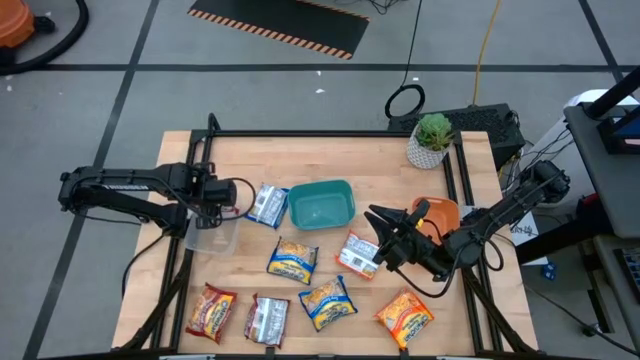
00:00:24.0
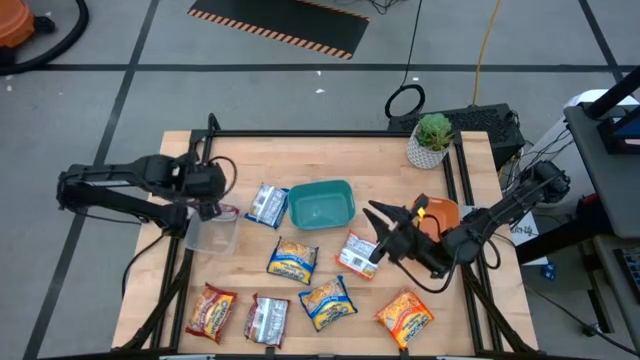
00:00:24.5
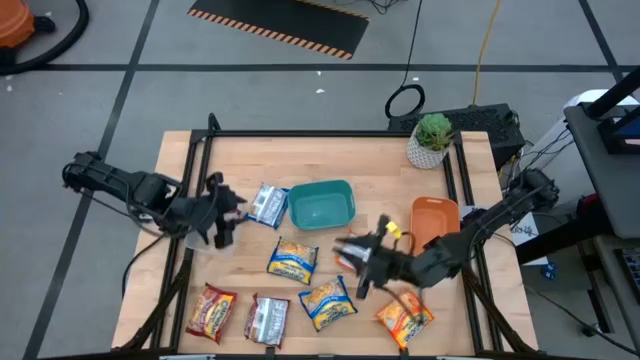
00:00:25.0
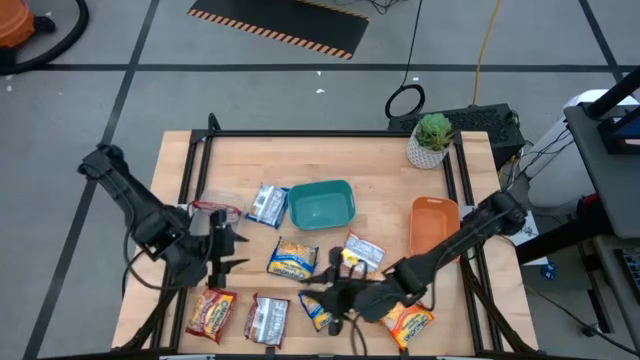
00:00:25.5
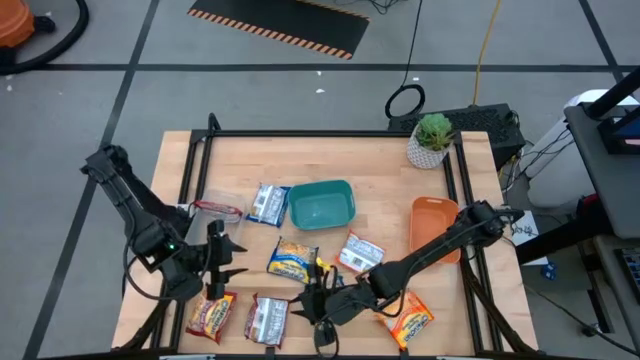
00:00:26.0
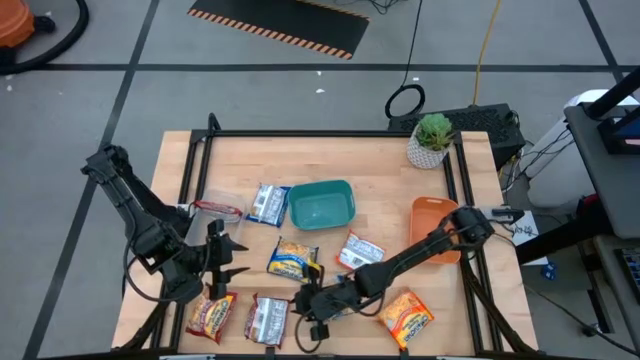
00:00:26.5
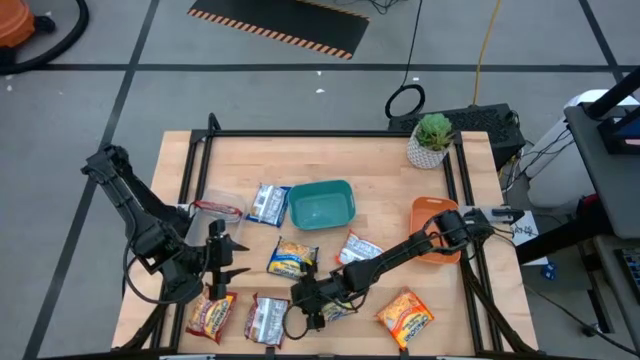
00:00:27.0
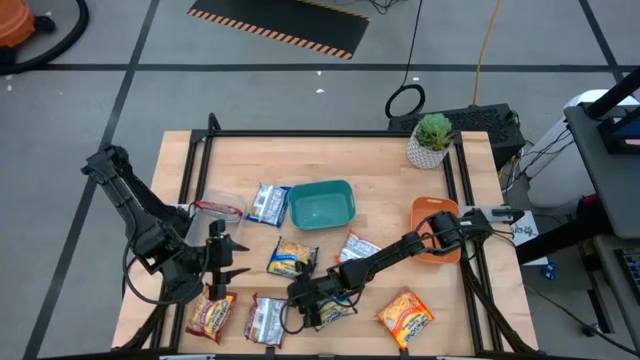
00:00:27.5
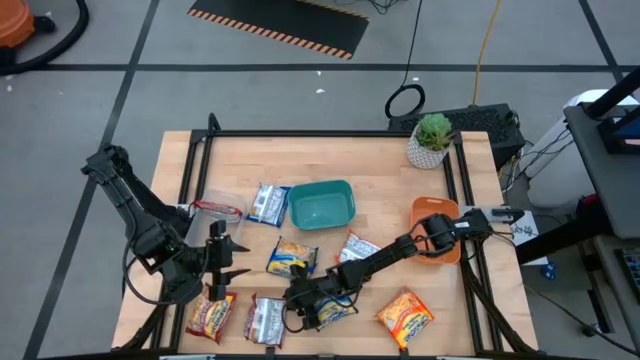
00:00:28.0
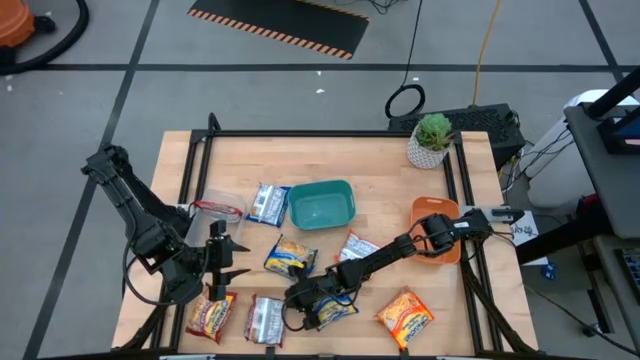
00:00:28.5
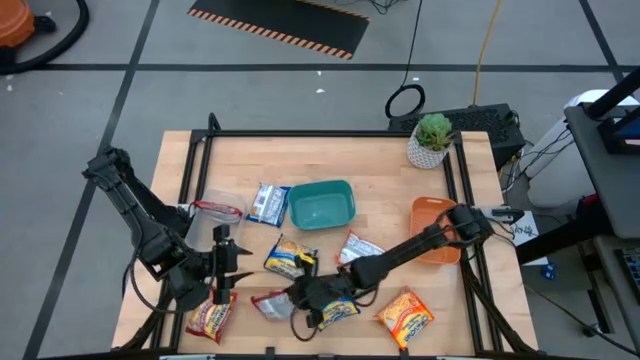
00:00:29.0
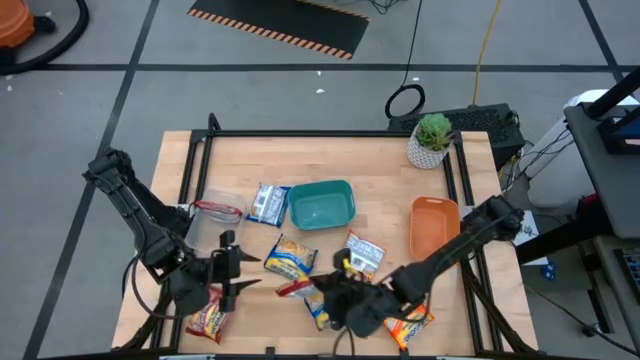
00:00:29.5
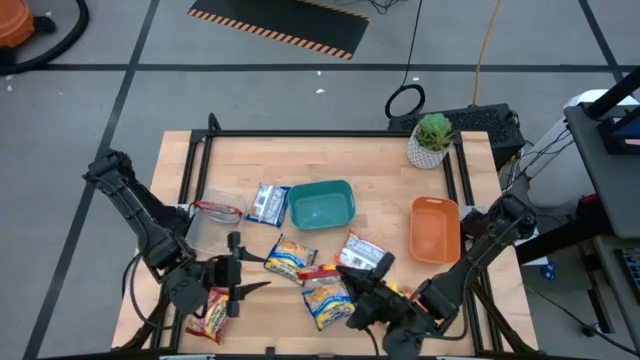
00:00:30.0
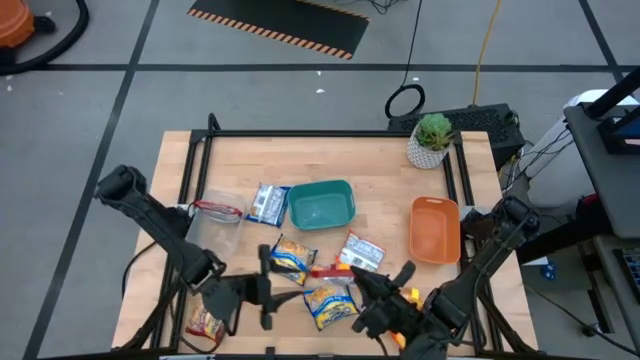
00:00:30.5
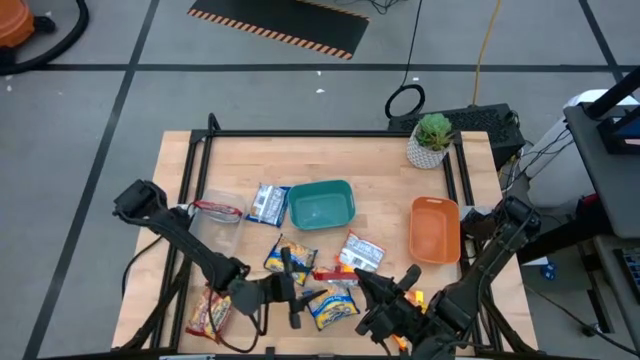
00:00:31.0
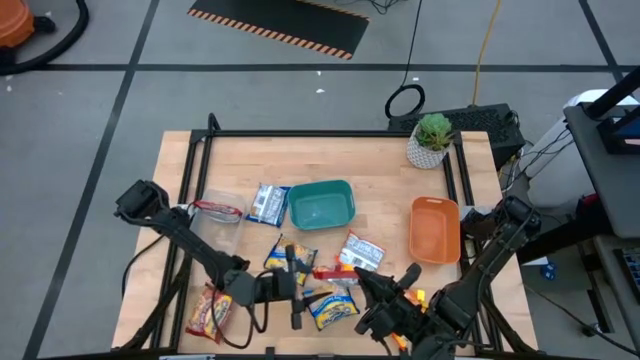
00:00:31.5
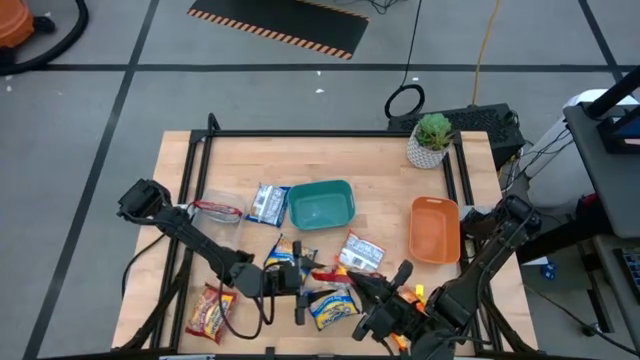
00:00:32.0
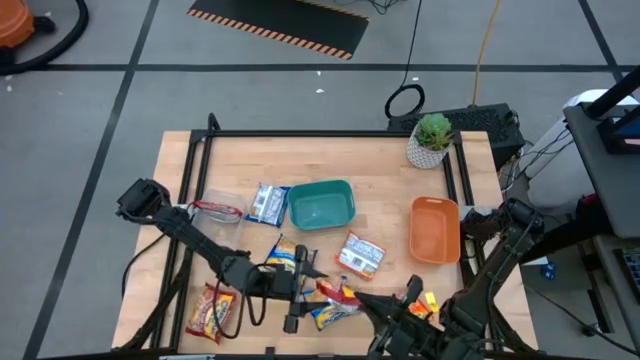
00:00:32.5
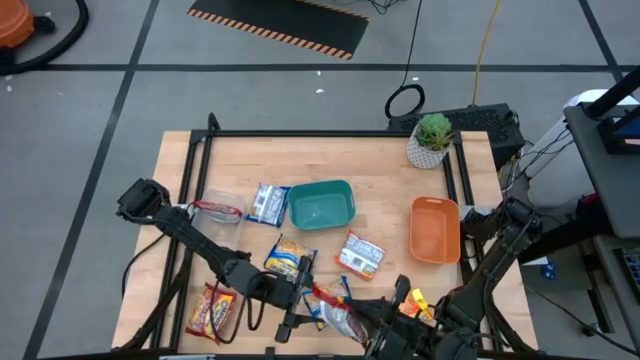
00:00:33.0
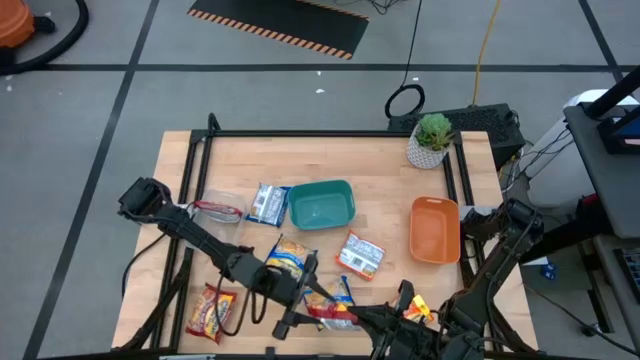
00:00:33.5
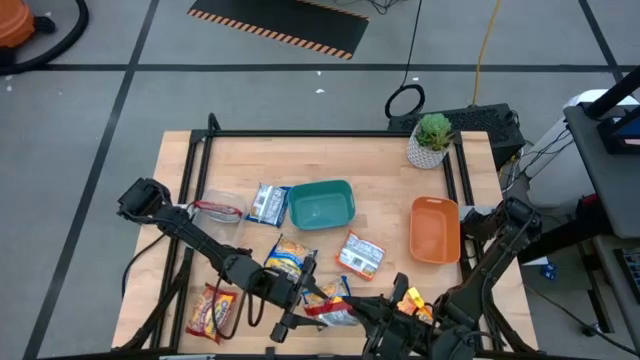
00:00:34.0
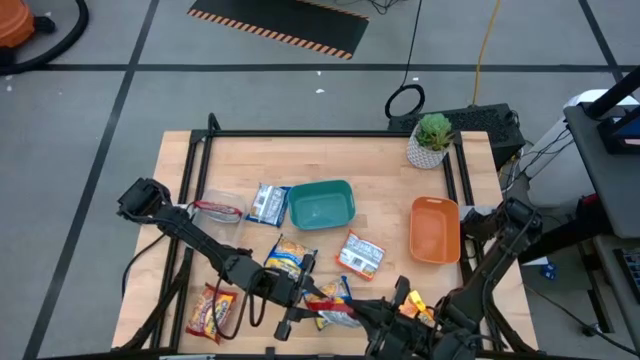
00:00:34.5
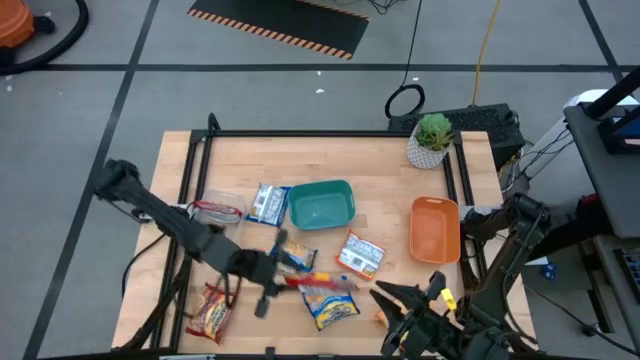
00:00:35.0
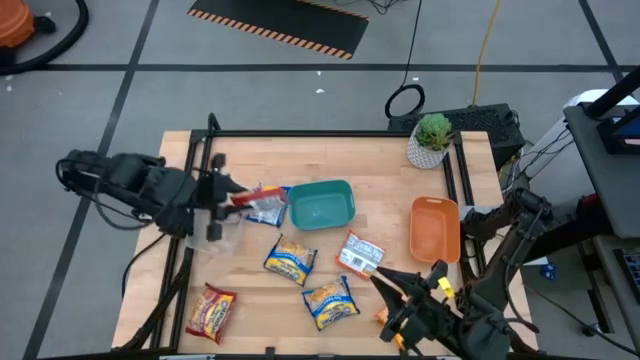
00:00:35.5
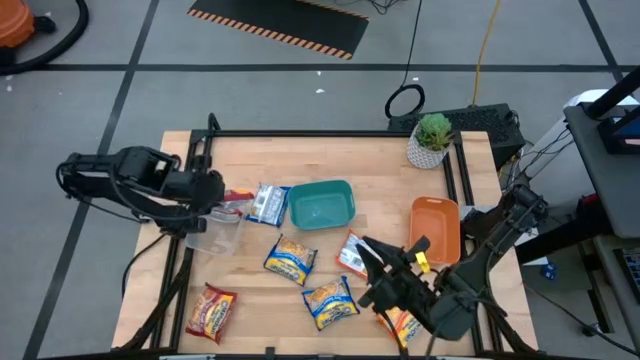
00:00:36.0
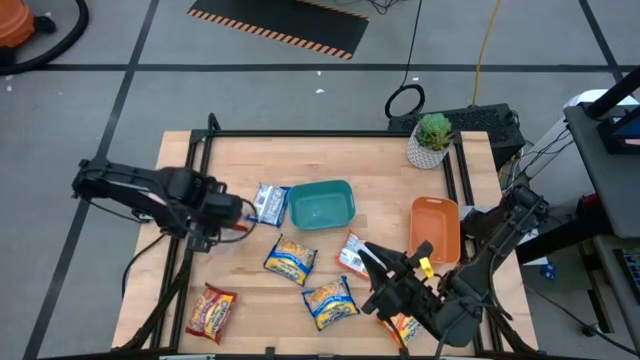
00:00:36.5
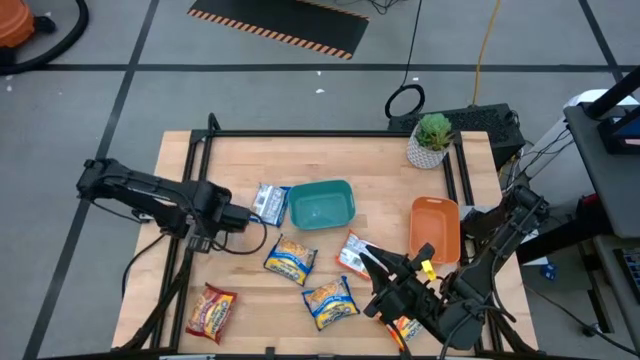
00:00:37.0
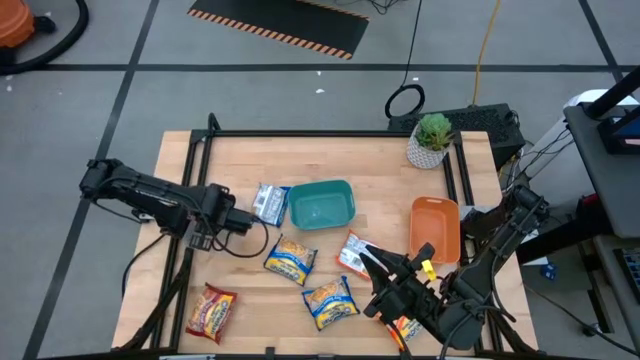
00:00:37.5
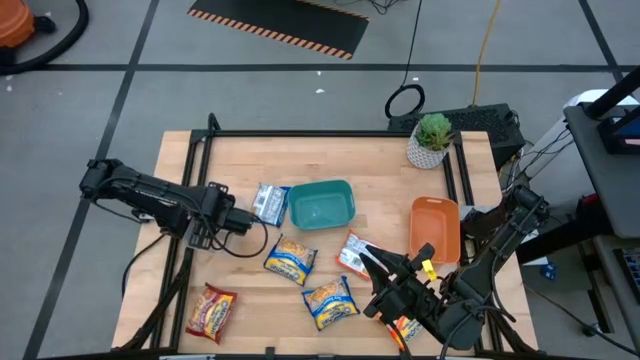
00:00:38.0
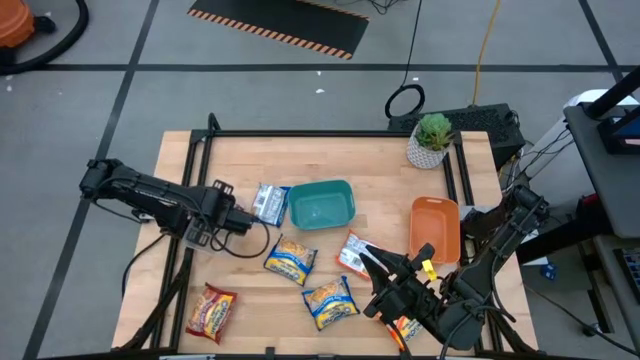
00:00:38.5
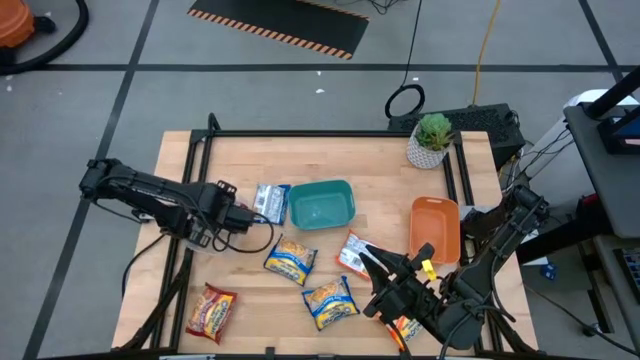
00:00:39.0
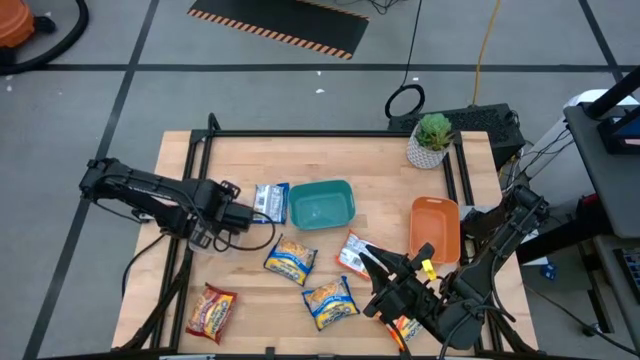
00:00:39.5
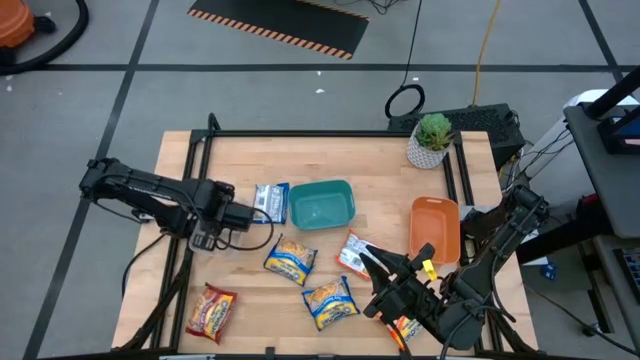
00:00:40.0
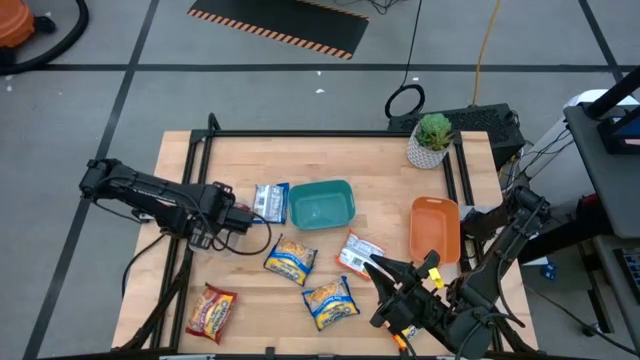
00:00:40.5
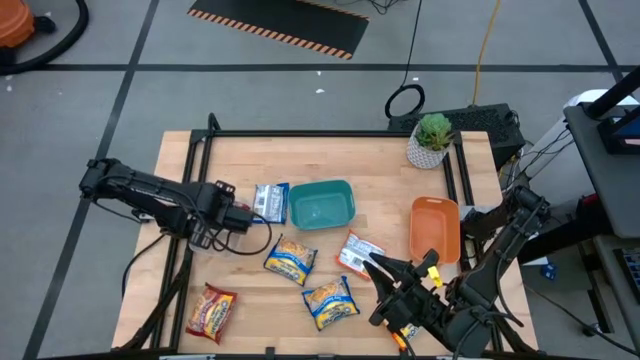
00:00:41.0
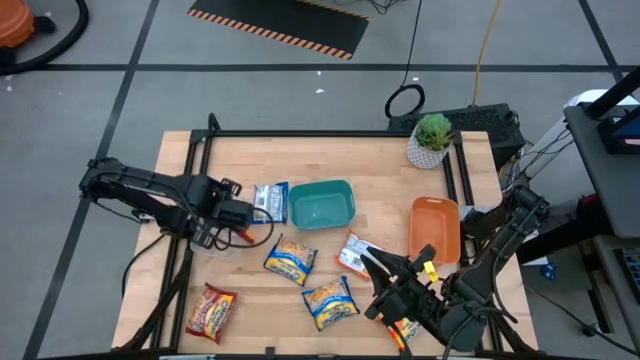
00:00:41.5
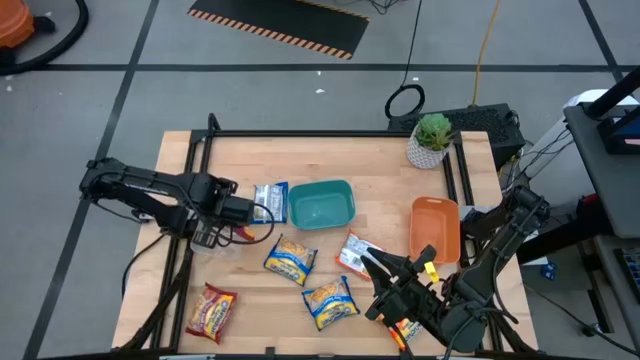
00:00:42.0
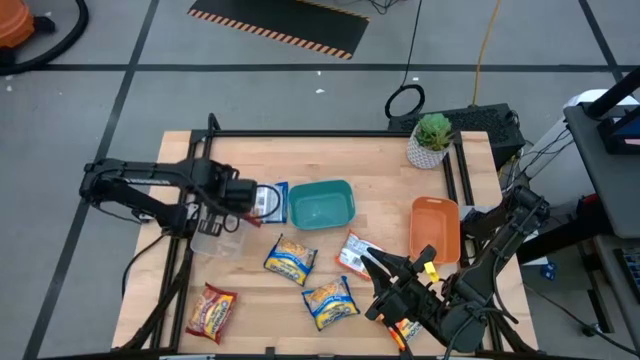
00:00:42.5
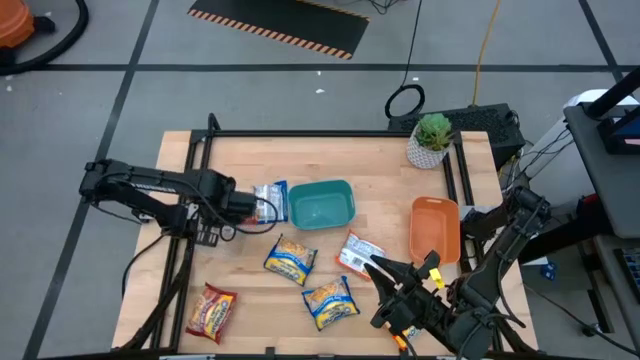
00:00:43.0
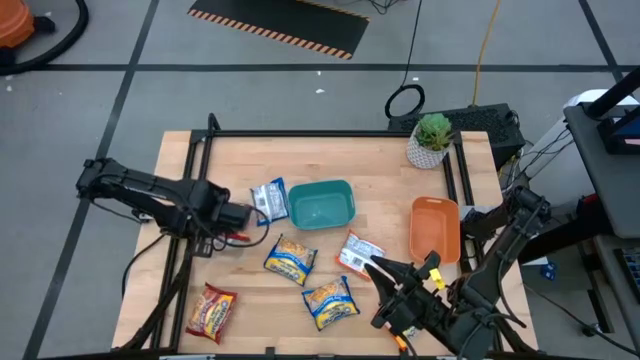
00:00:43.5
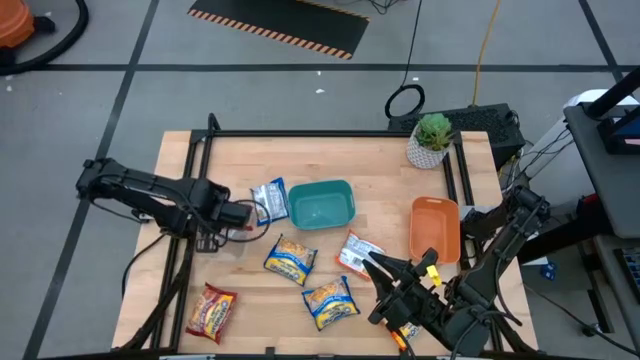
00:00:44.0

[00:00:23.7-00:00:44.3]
Task: Sort Maruchan noodles
Put the right red noodle pack into the transparent bin
